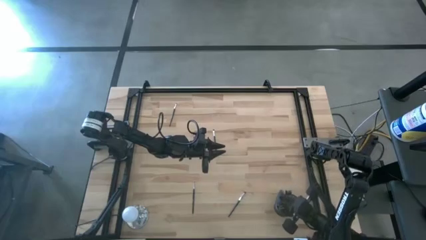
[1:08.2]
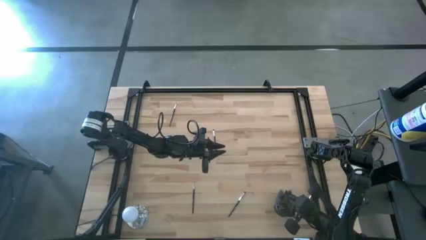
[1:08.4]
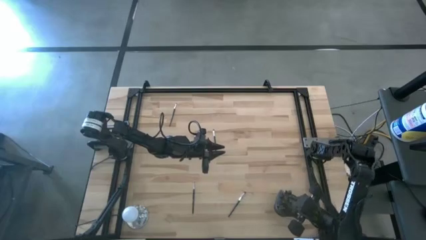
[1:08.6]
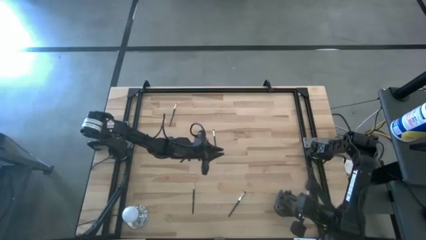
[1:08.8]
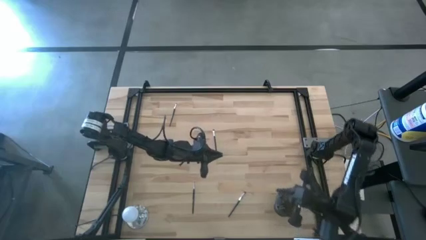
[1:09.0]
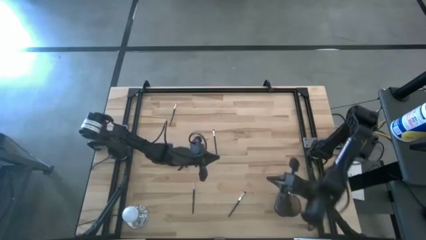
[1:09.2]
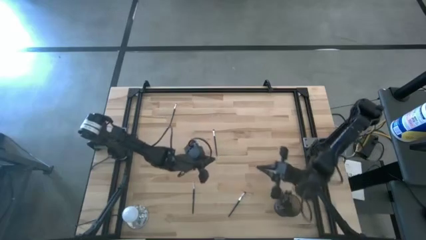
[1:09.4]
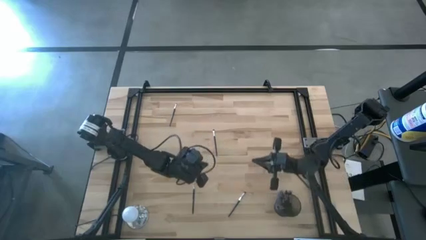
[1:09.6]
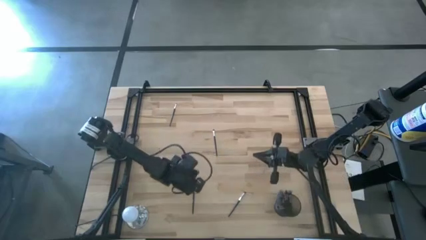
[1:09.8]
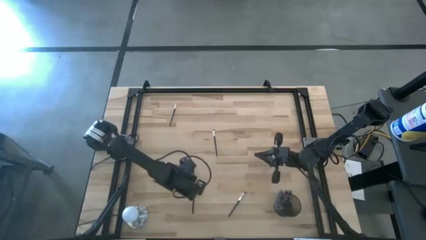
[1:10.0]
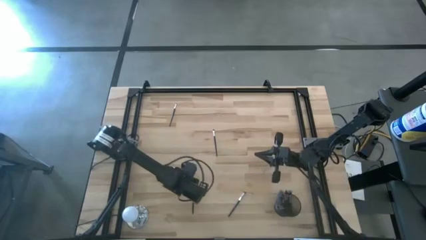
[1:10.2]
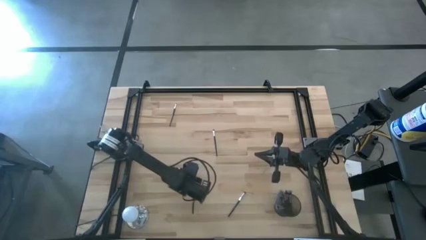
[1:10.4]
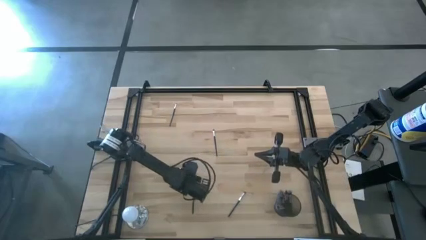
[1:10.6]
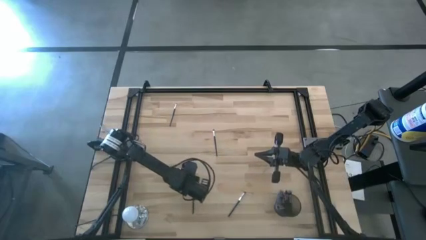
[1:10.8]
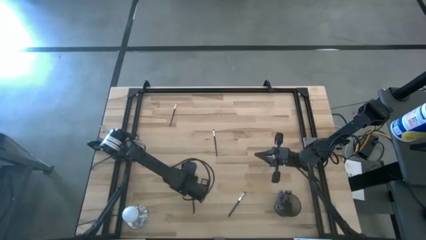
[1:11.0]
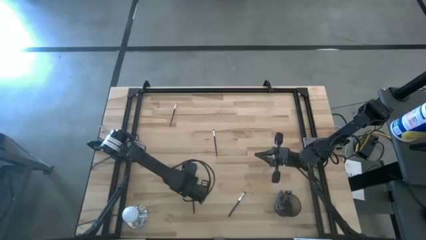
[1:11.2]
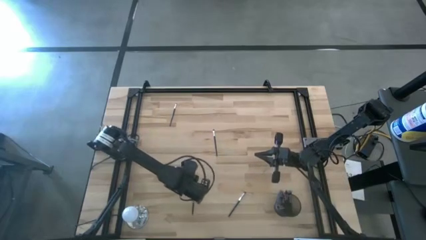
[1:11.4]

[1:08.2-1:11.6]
Task: Sort items
Put the liner brush into the wire basket

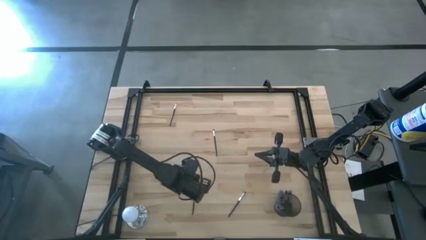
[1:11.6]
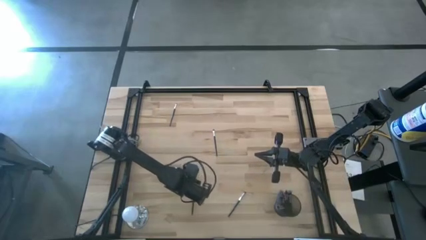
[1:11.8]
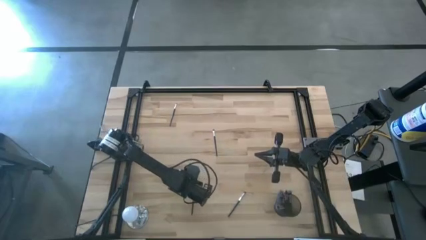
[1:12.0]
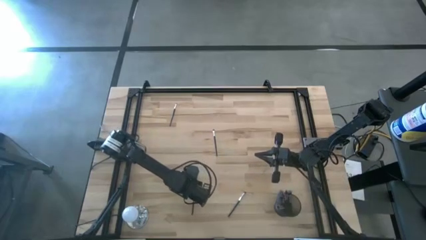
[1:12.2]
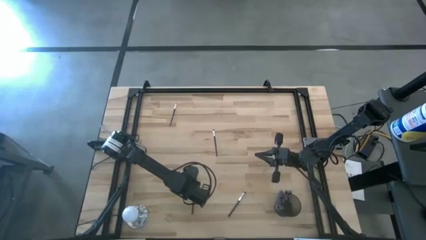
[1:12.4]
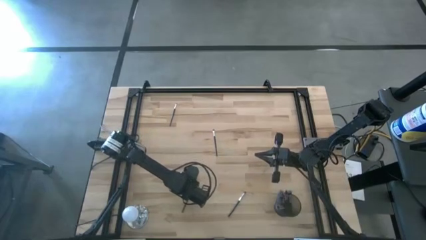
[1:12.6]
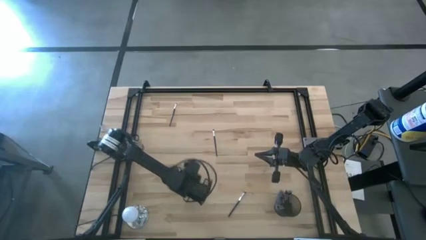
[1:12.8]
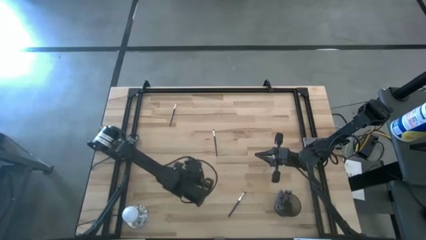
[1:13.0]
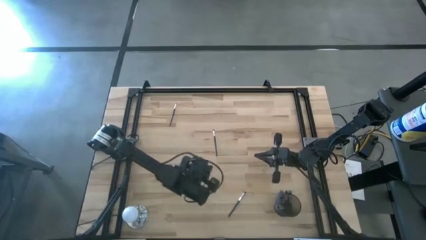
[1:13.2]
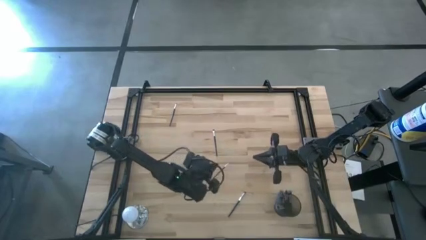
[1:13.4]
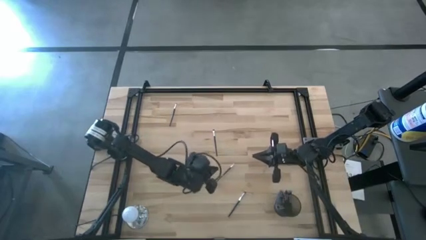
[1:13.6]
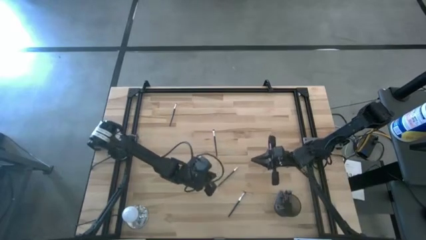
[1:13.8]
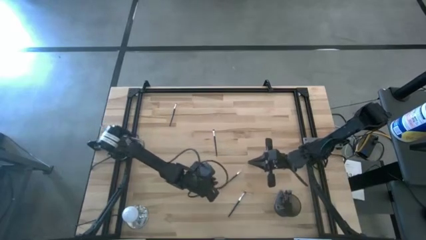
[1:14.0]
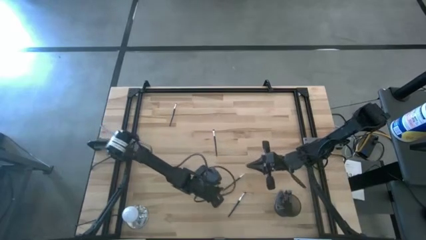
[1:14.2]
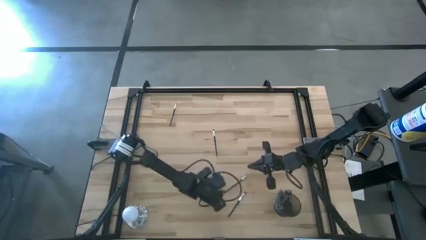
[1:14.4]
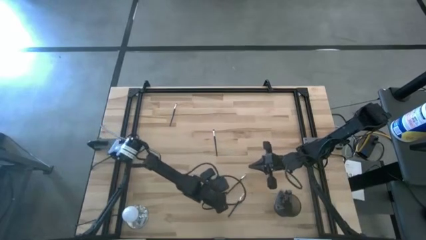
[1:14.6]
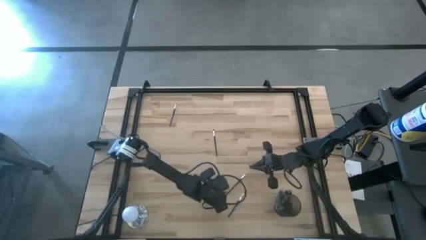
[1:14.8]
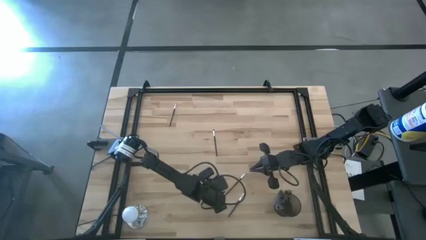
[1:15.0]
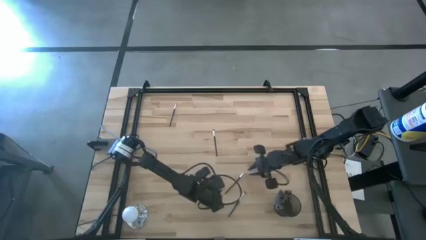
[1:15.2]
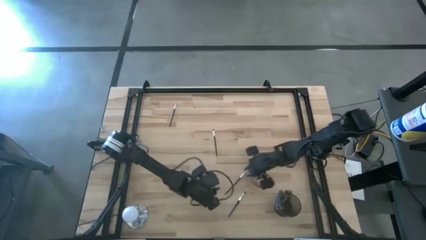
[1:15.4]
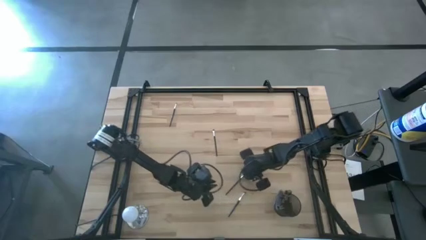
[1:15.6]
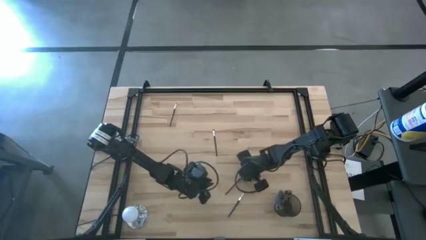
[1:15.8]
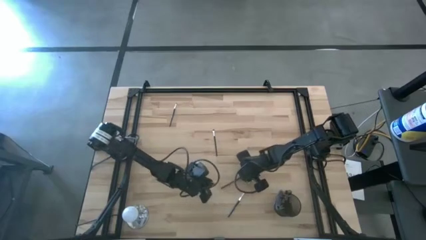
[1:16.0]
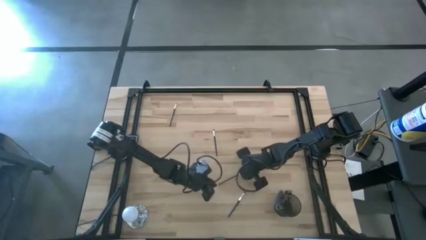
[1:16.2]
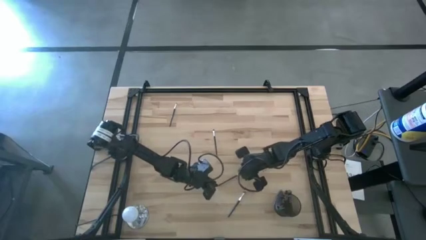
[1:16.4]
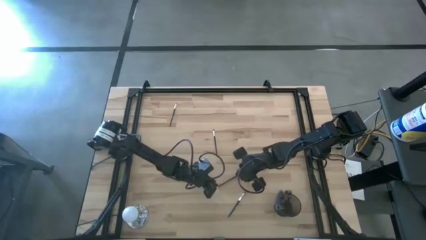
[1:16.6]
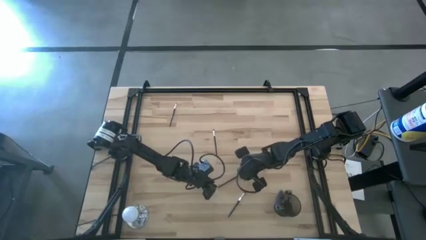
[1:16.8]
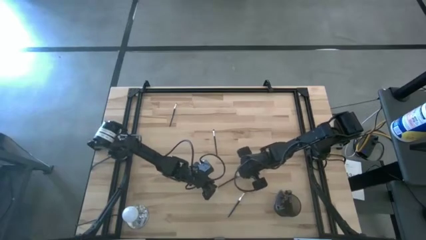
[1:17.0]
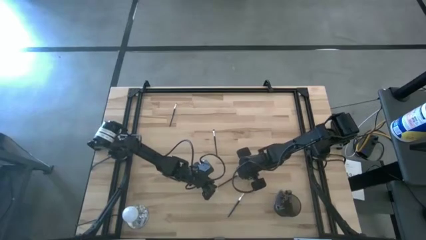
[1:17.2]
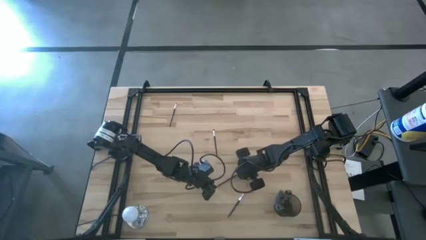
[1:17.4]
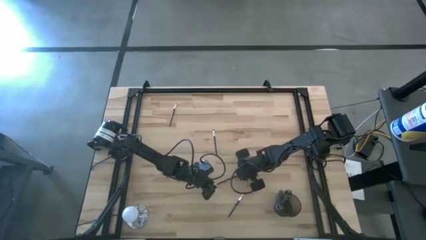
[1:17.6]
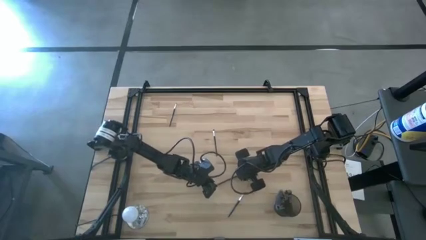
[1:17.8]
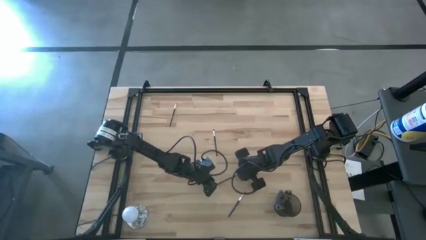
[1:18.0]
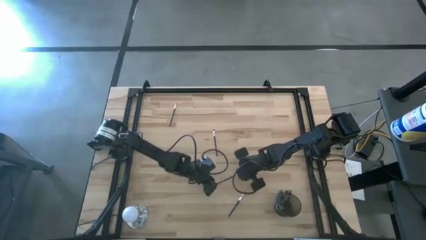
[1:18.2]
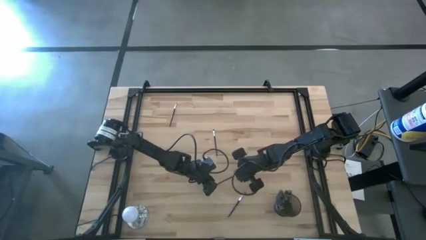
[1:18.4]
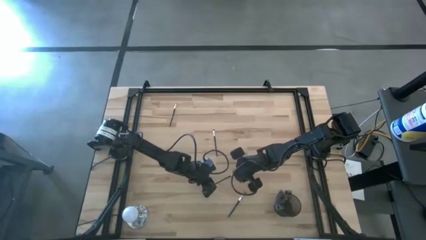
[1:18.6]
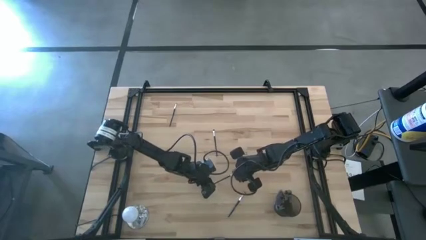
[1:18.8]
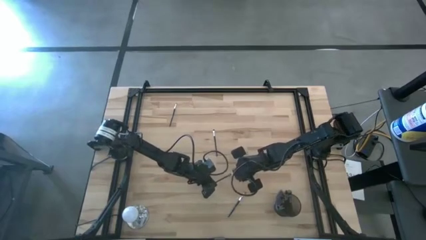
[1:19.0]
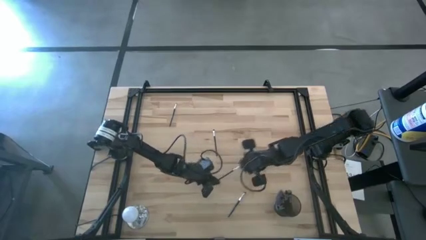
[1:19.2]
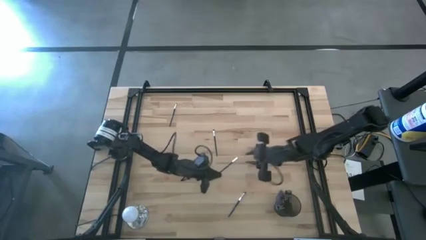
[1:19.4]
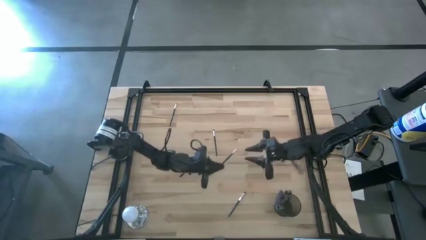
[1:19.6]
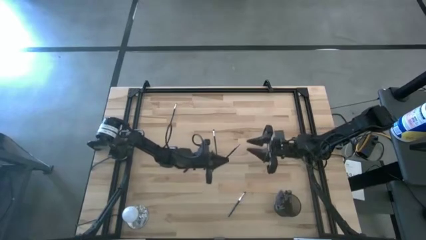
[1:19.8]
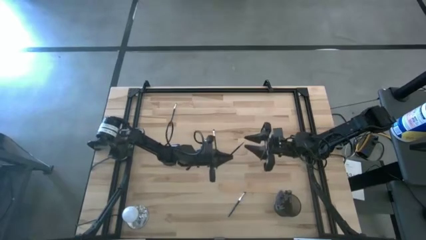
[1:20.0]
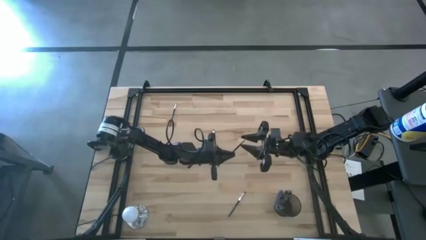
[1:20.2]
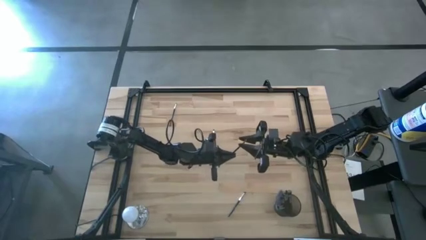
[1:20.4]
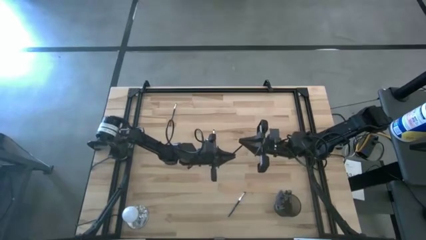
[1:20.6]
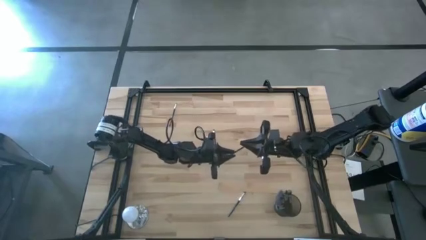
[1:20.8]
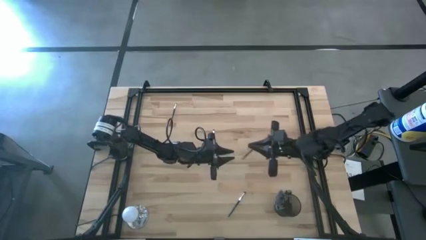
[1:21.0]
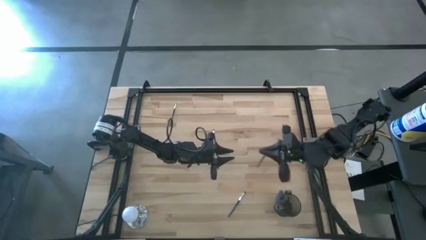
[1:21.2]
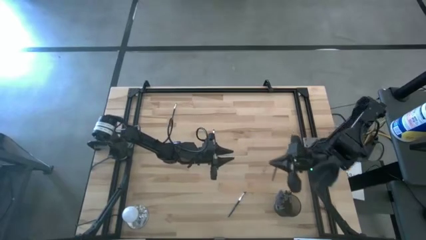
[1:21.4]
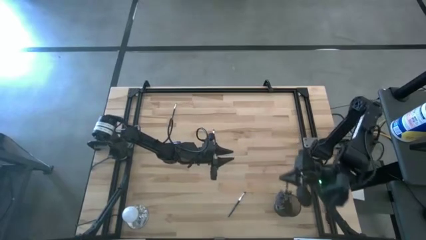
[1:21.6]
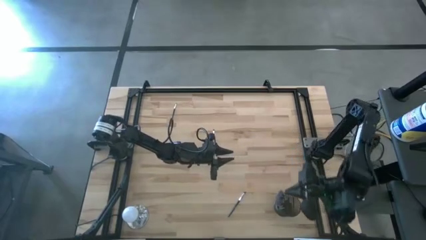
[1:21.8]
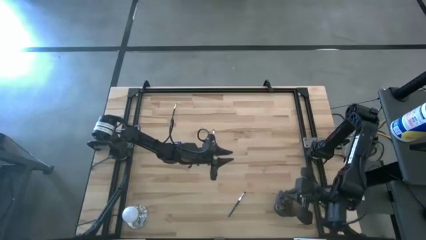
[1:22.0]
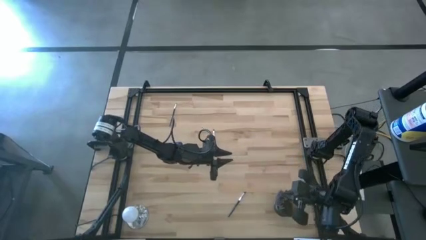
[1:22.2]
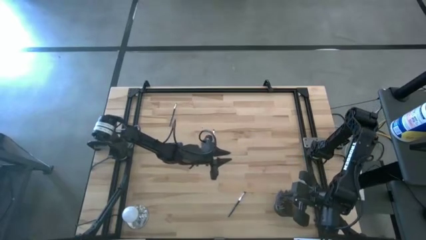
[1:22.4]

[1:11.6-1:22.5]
Put the liner brush into the wire basket

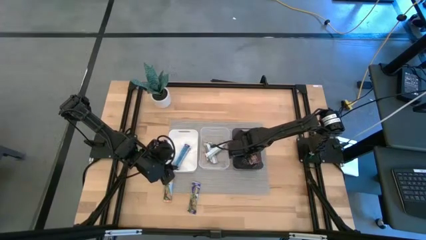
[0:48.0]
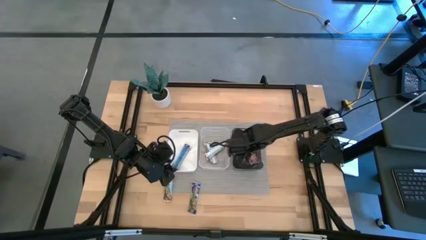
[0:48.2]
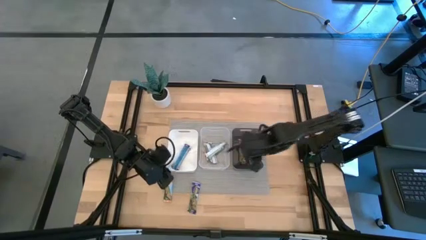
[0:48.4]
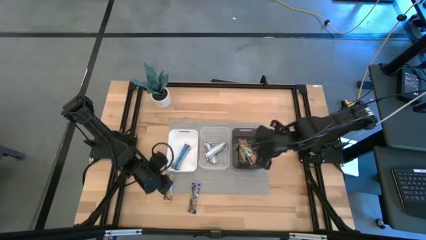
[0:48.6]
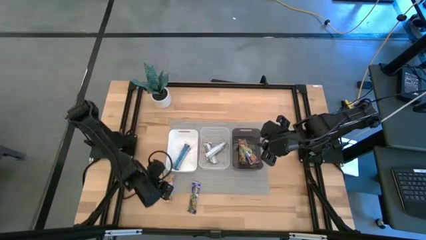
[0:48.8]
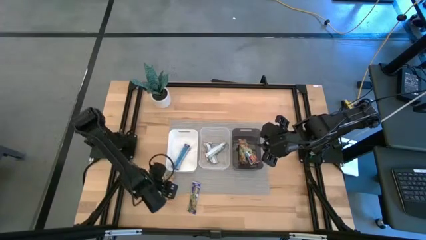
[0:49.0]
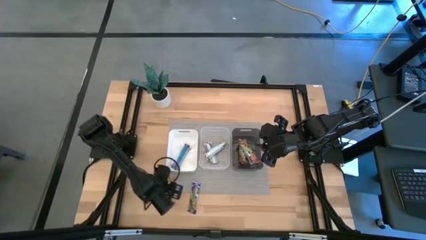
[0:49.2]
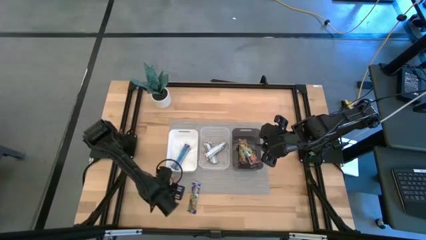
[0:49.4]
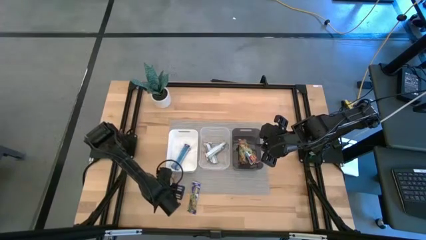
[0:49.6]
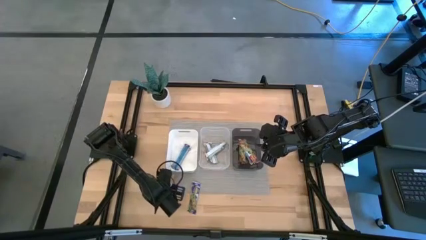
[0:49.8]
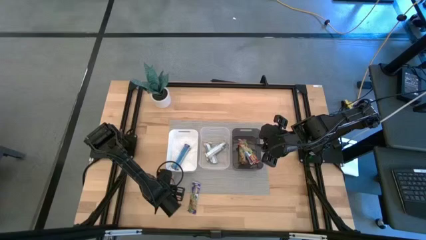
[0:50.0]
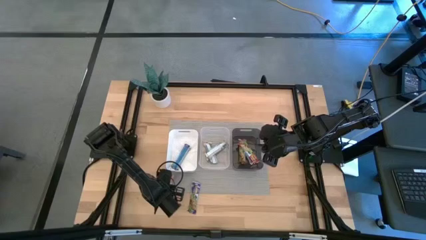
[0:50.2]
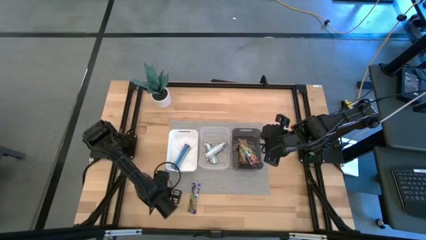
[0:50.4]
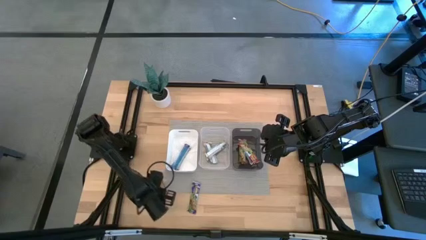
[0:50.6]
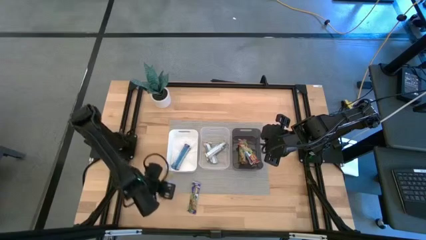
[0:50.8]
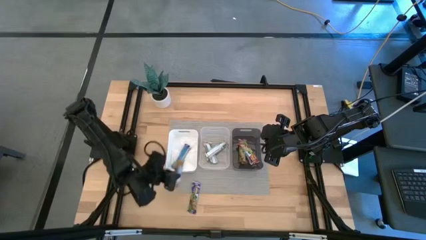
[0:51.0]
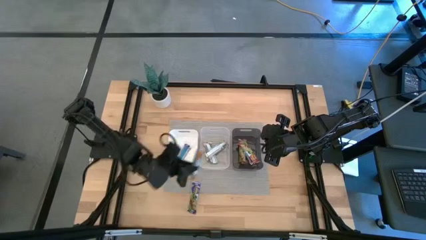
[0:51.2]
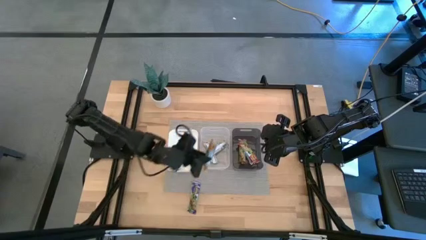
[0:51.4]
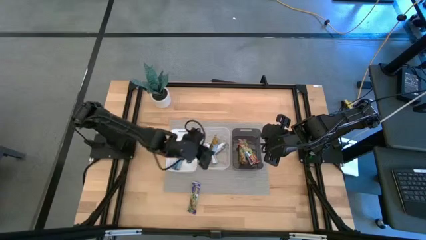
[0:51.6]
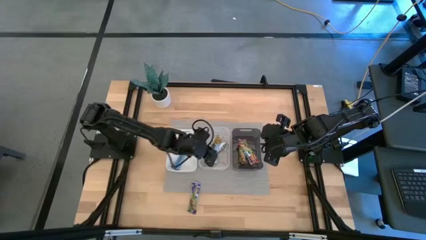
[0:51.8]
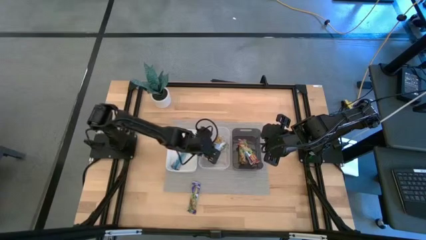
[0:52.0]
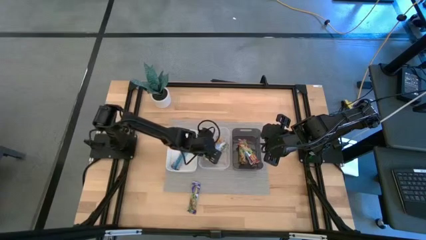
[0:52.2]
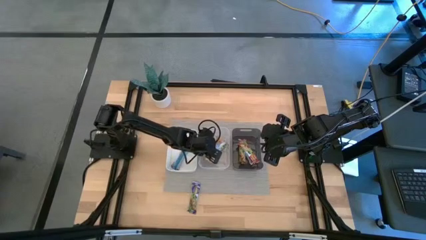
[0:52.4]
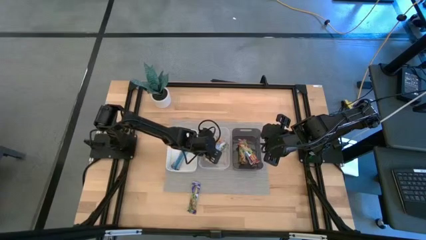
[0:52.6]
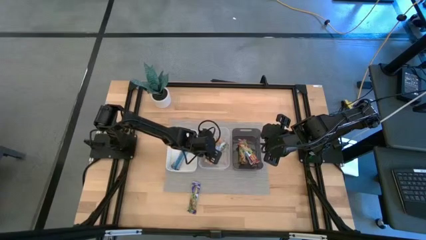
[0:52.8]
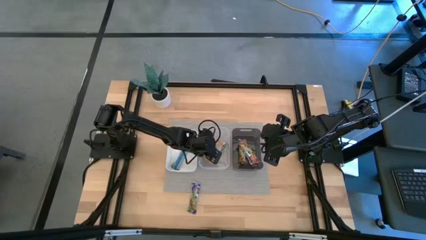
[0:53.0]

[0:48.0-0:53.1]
Task: Pick and place Granola Bars by type
Put the orange granola bar into the transparent bin
